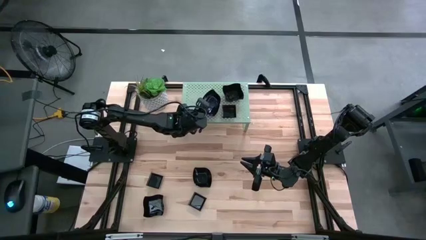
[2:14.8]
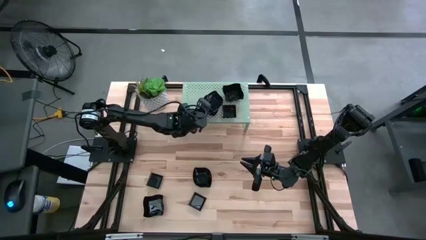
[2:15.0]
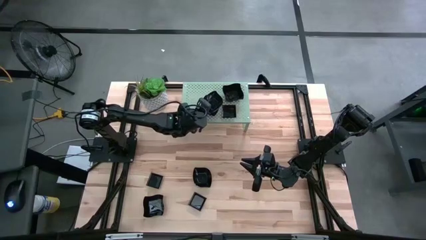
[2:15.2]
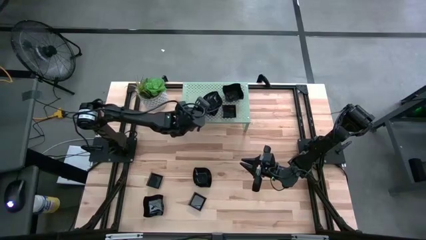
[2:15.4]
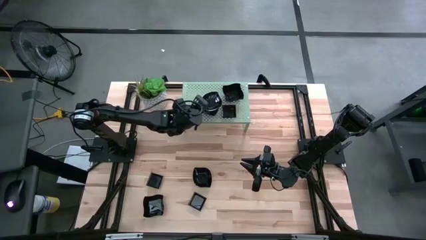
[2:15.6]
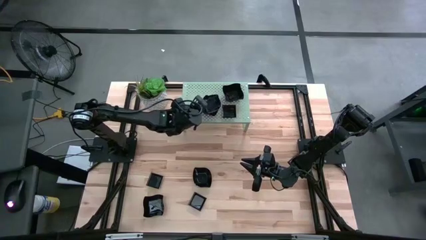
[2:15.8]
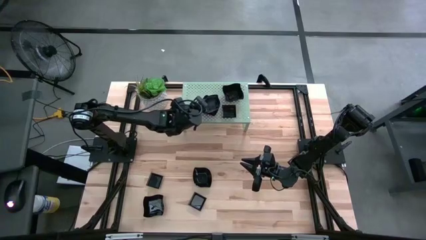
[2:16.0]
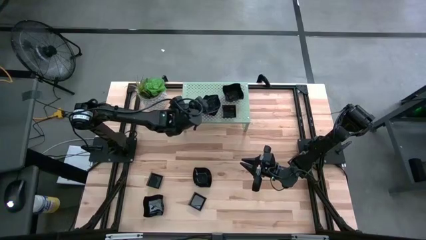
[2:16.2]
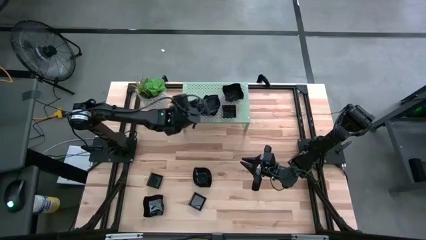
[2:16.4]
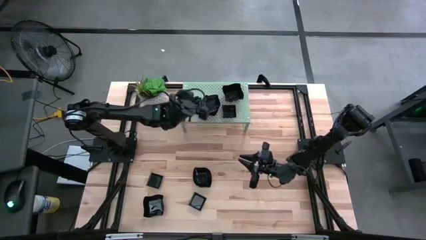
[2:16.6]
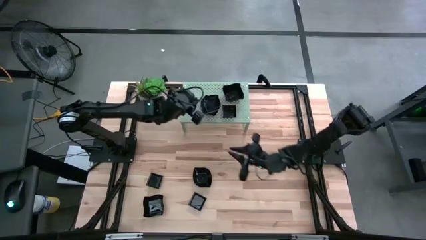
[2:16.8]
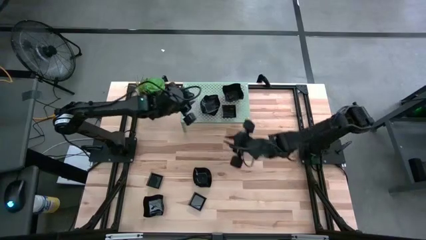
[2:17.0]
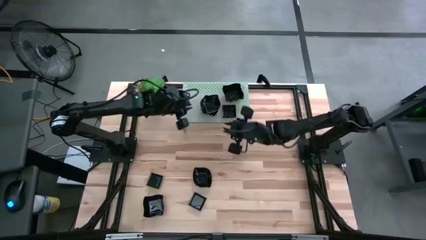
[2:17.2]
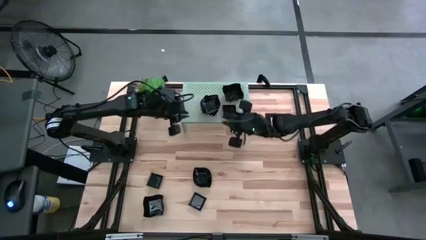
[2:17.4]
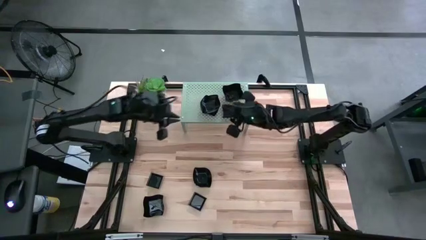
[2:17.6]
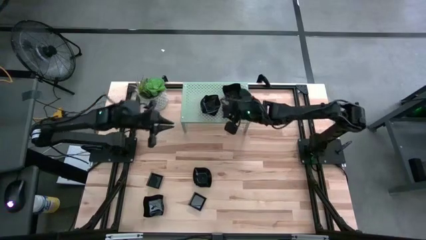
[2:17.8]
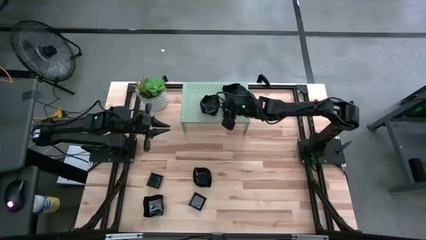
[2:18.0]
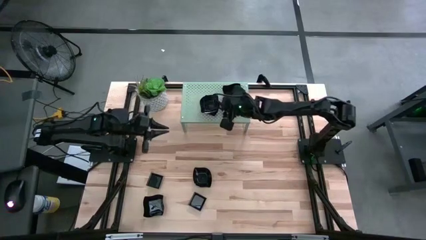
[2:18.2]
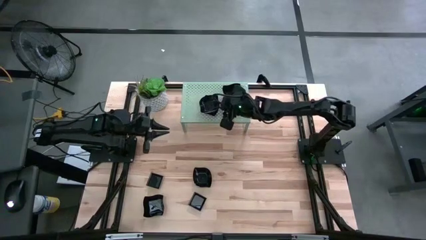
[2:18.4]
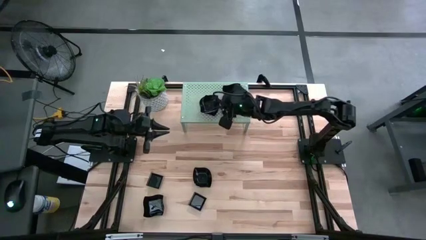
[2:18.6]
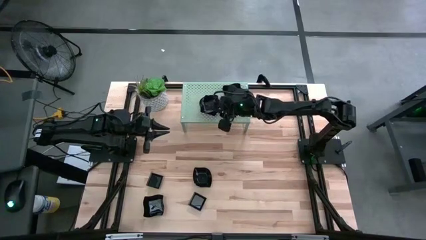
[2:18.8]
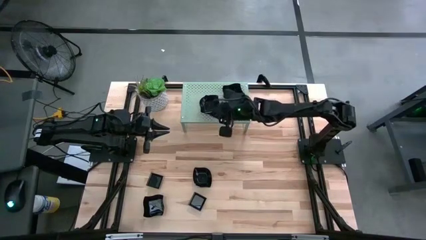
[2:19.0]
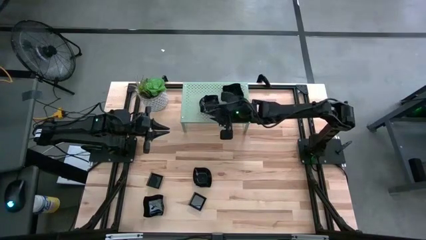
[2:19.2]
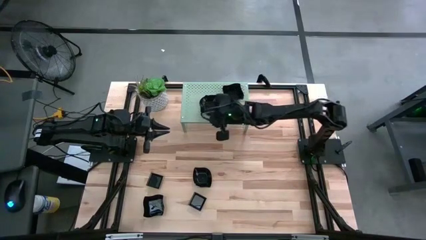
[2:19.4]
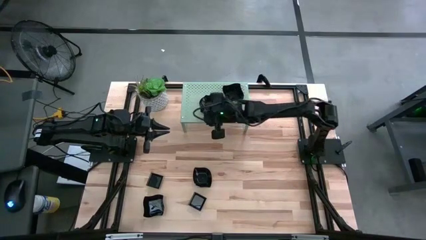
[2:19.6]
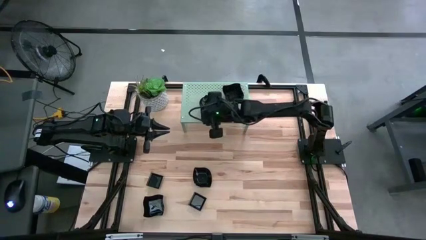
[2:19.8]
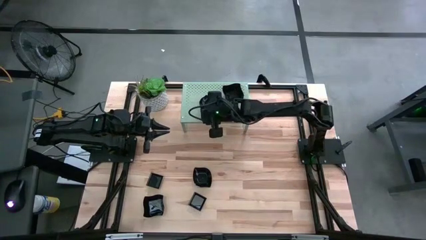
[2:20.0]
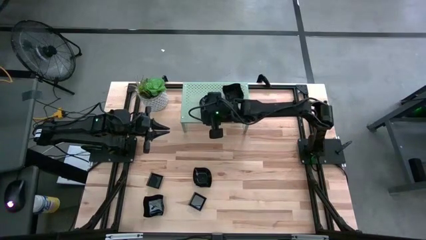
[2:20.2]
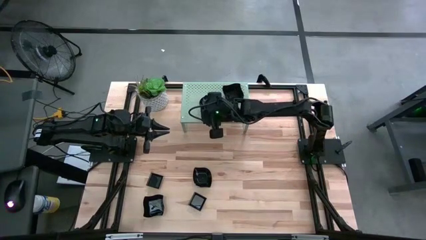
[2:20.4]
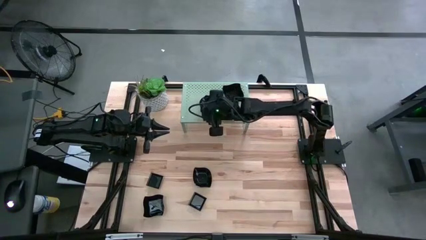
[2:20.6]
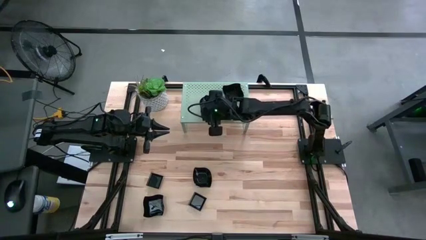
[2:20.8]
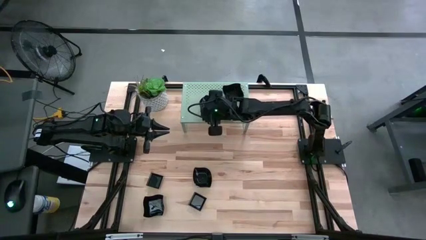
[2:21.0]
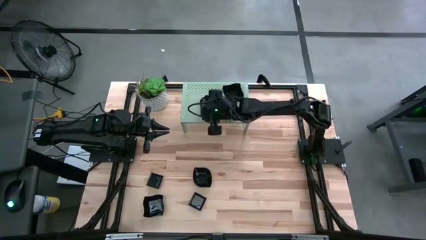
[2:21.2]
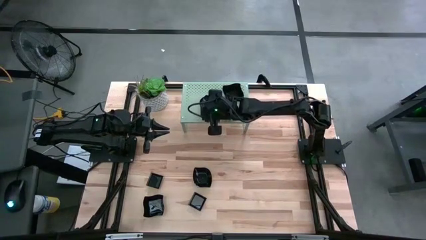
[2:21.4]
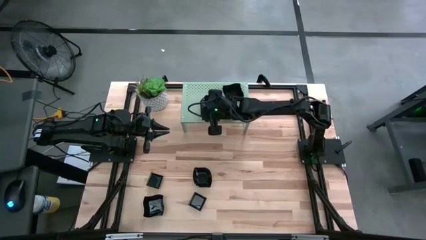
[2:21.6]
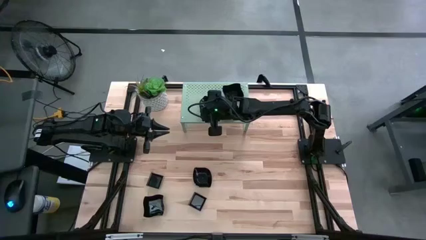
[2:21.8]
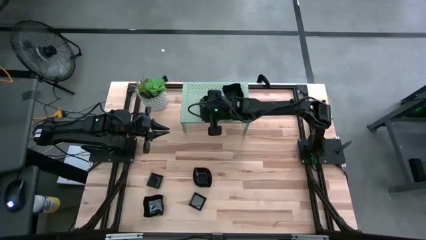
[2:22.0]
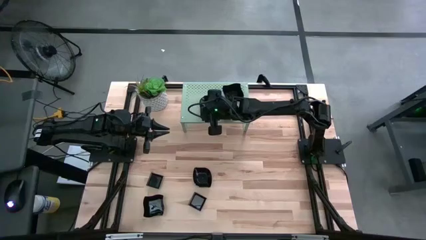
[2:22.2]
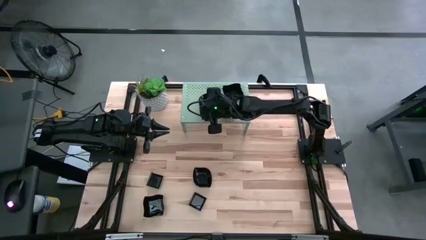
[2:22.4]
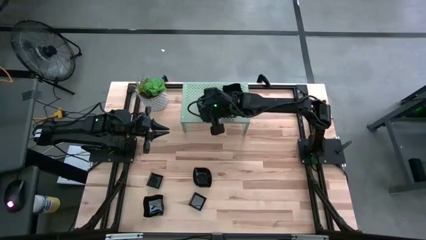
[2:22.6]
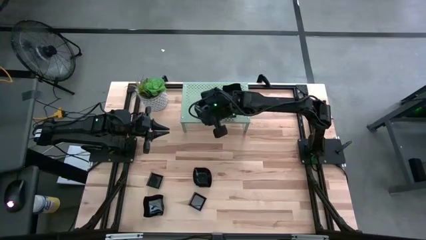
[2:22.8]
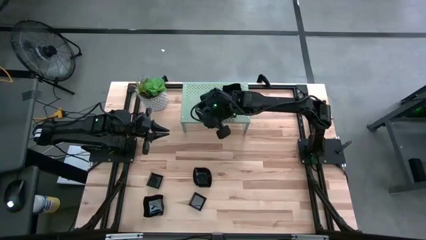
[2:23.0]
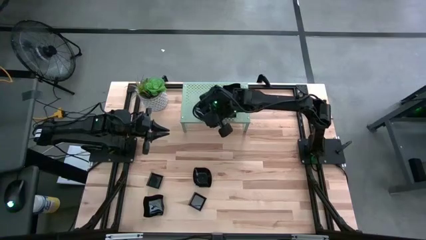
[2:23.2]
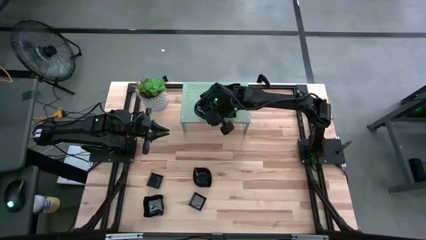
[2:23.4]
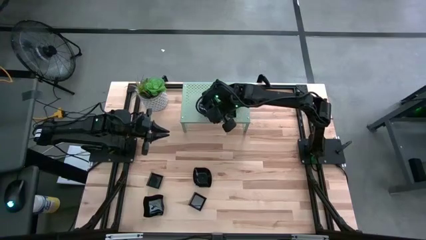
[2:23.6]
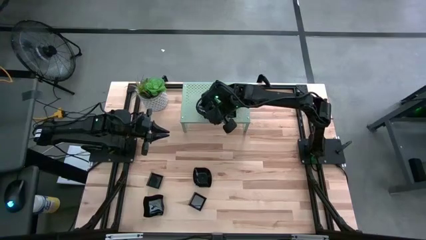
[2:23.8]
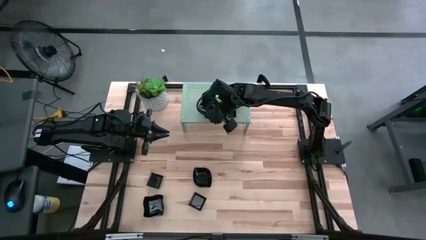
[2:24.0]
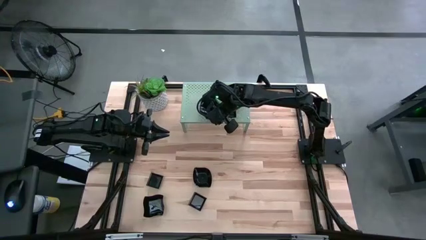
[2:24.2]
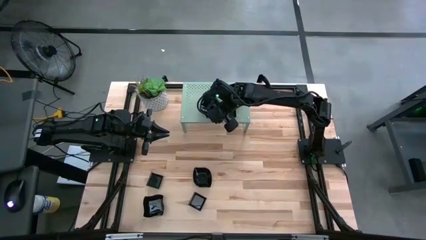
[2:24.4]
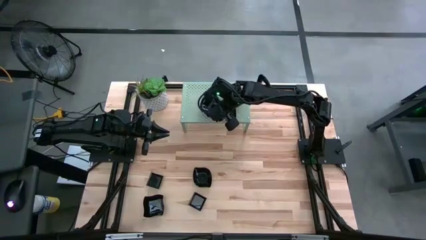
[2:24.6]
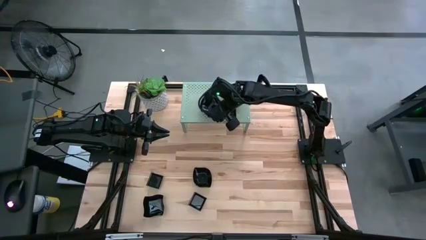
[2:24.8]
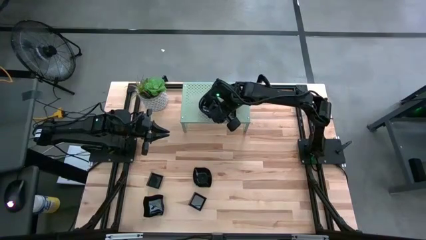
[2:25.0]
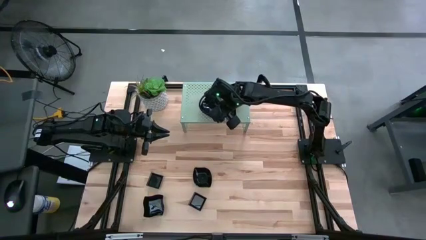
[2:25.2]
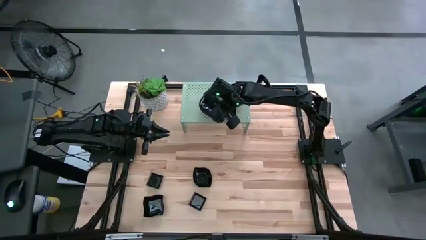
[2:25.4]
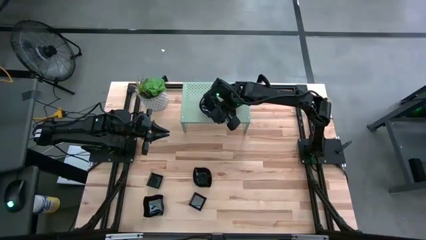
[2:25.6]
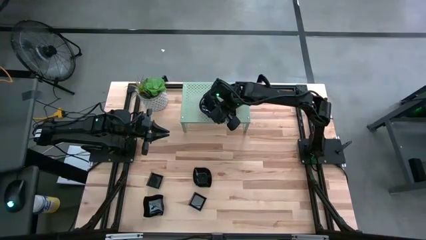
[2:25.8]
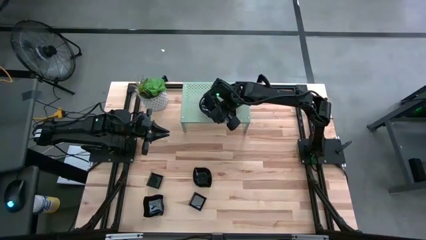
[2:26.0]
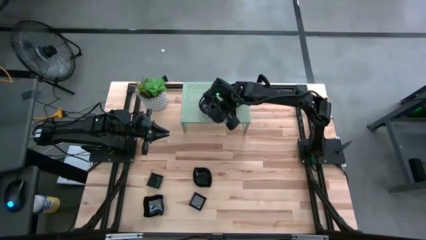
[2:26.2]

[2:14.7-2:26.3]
Task: Pick & Place Mini shaped plates
Stack the leaf shaped plate on top of the leaf shaped plate on the shelf

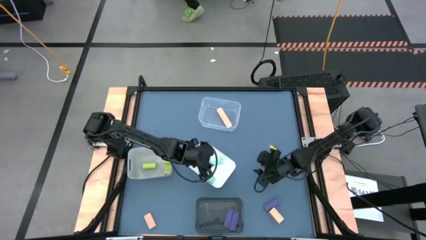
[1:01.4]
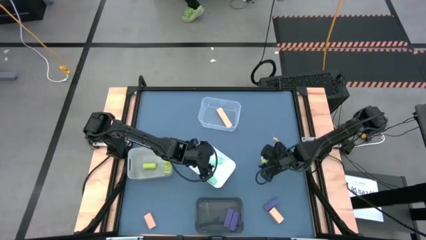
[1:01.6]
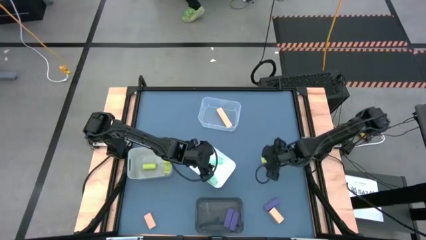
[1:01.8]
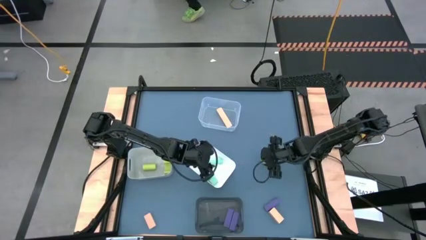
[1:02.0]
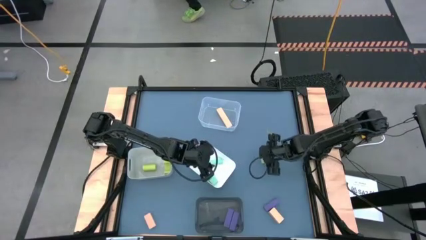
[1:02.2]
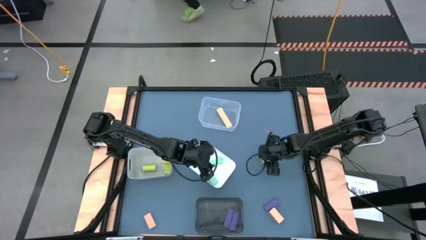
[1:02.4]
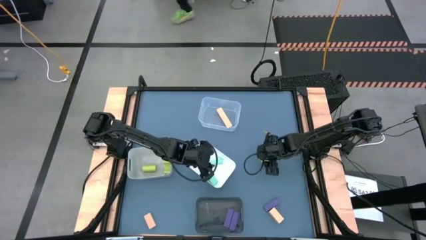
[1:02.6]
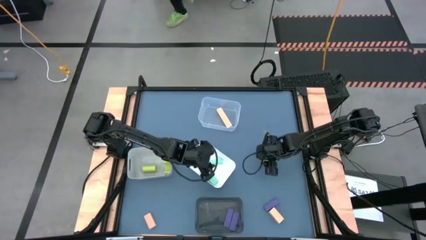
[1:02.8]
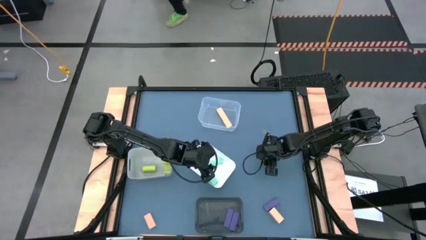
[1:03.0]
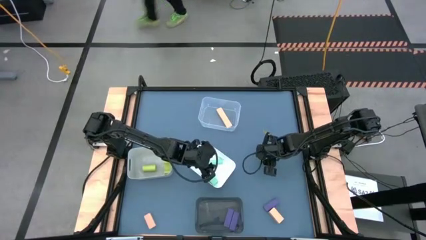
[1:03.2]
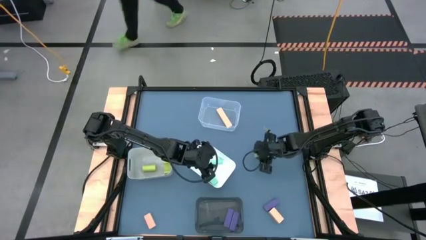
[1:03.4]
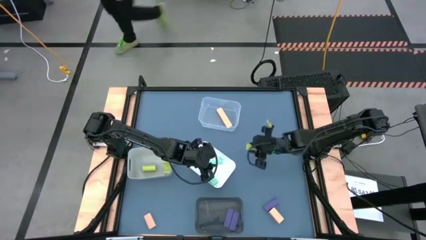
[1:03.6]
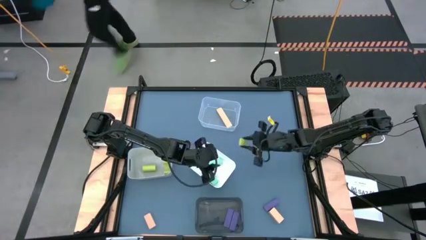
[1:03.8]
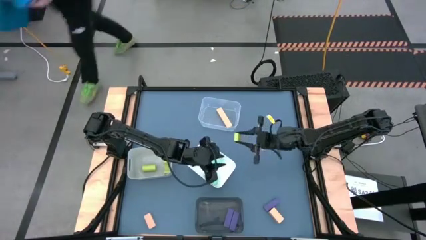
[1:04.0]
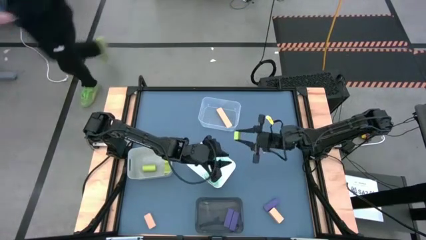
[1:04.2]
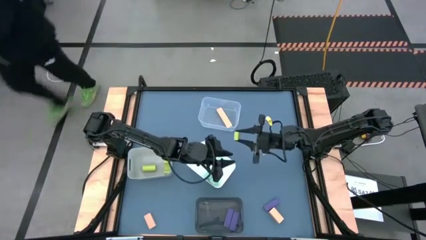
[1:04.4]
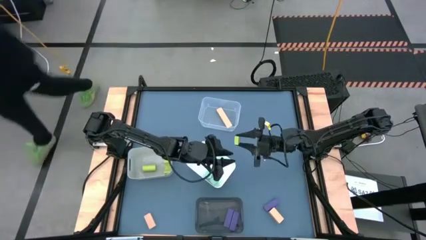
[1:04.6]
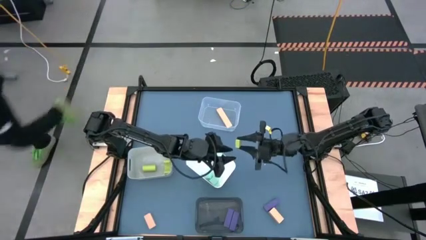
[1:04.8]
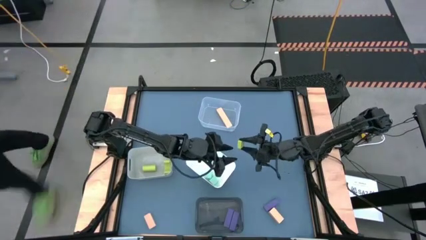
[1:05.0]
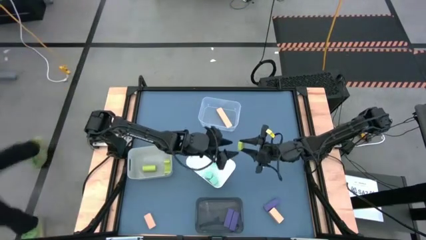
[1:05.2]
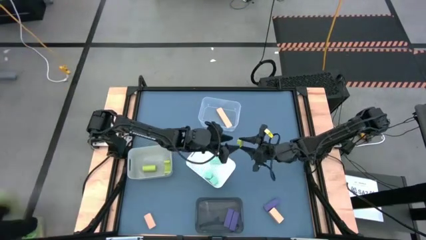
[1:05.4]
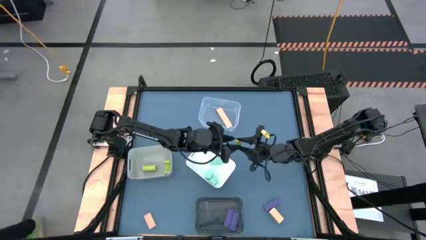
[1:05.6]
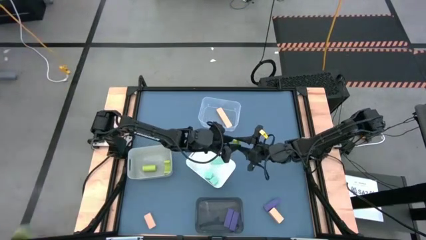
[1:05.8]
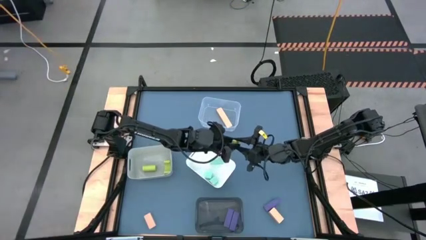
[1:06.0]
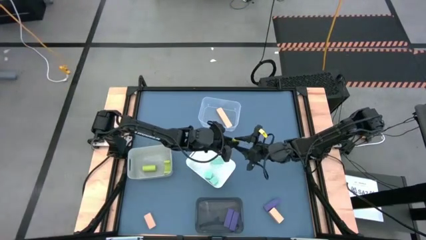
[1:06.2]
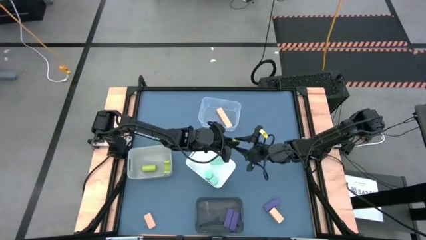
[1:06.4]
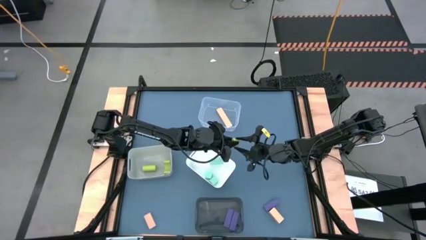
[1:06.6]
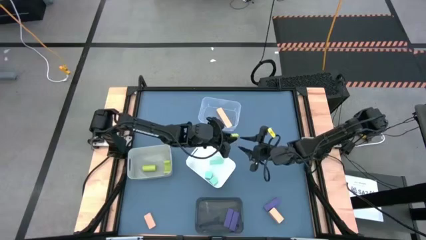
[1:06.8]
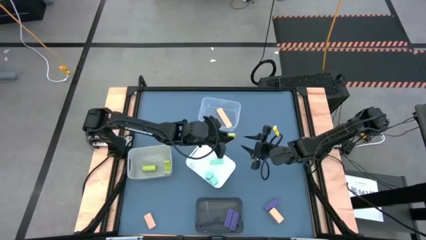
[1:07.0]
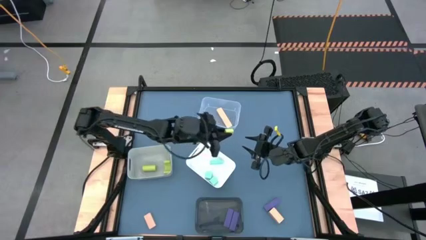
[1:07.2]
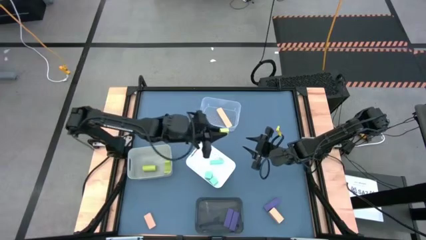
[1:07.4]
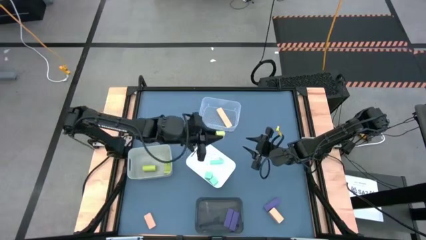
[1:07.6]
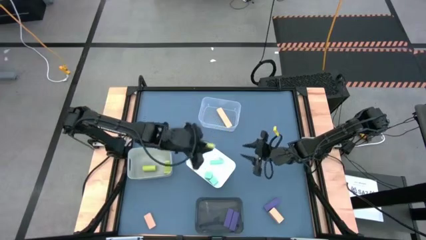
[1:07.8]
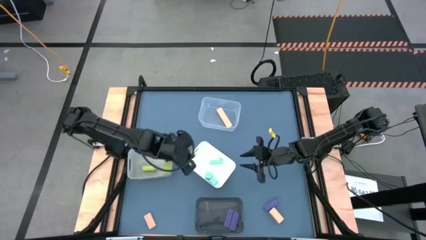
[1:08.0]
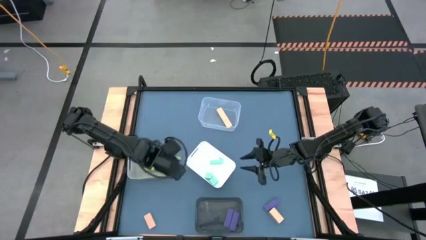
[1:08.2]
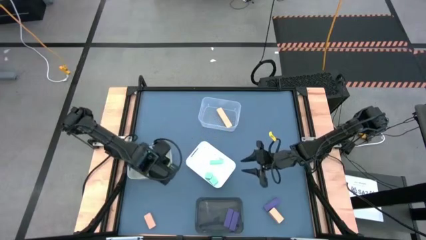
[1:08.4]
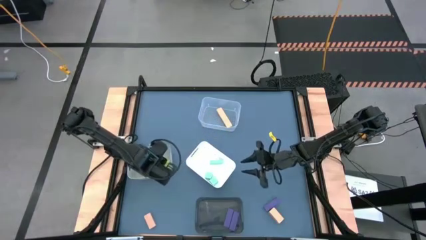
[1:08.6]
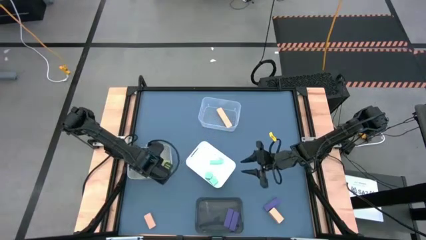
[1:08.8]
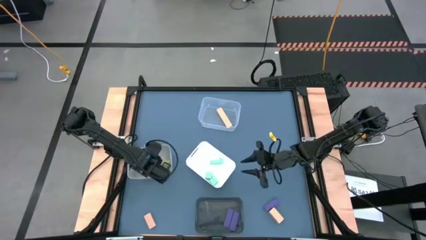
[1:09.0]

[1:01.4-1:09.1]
Task: Sort & place blocks by color
Put the green block into the gray bin
